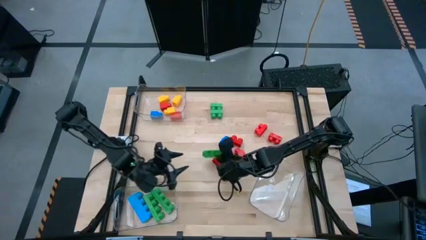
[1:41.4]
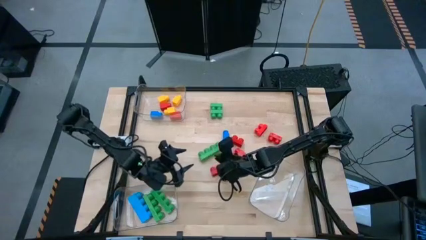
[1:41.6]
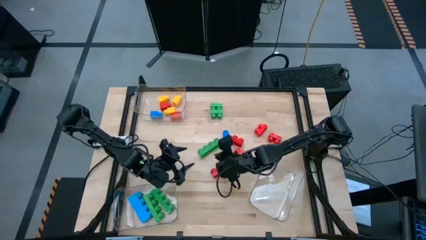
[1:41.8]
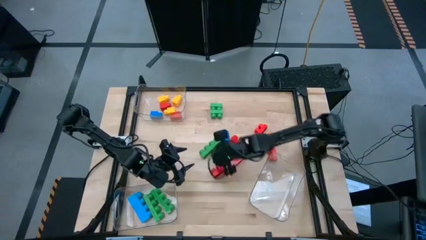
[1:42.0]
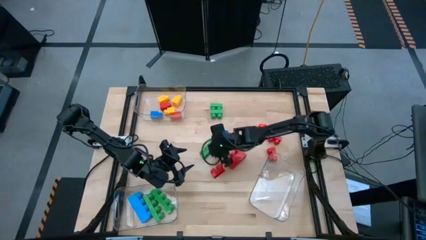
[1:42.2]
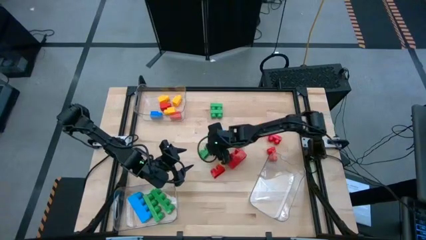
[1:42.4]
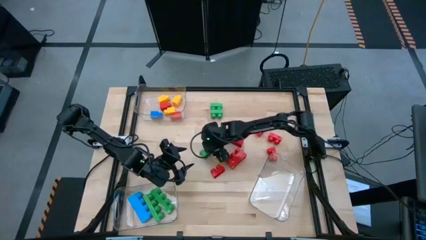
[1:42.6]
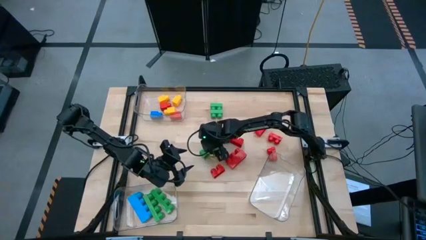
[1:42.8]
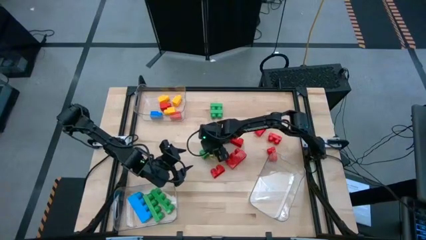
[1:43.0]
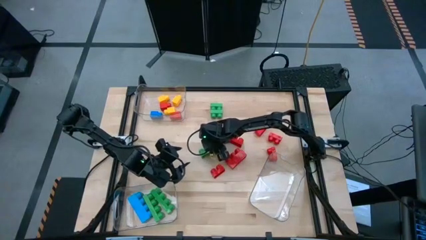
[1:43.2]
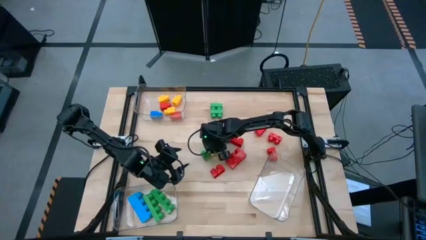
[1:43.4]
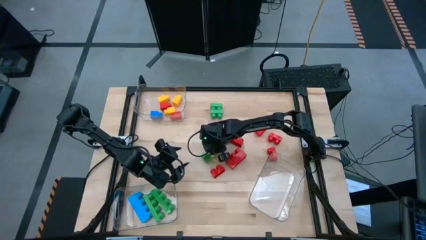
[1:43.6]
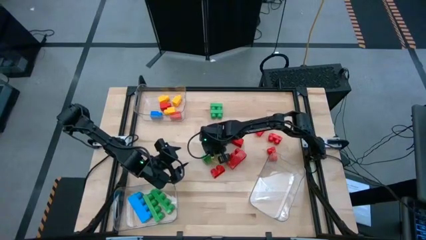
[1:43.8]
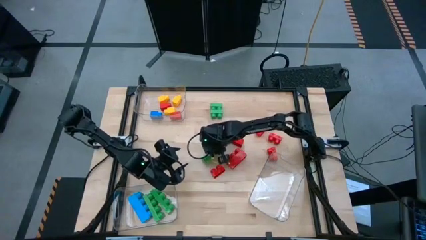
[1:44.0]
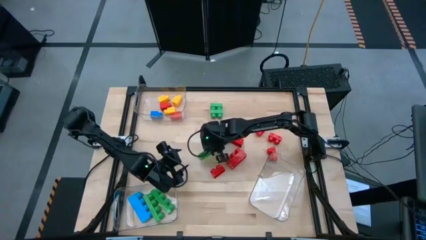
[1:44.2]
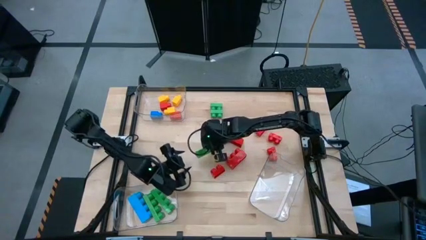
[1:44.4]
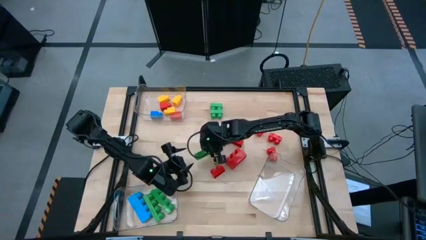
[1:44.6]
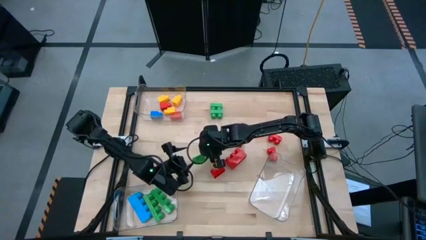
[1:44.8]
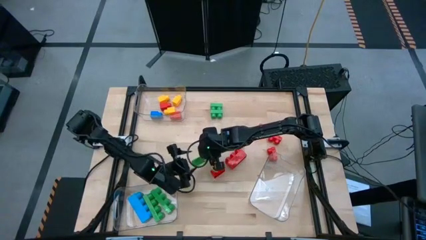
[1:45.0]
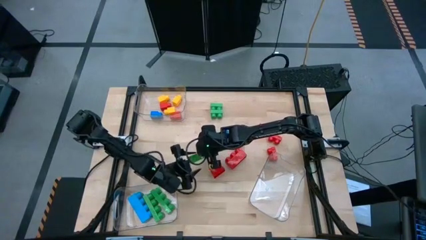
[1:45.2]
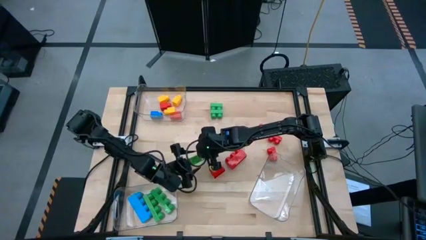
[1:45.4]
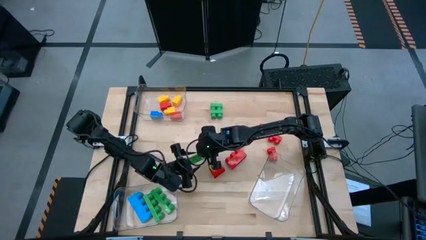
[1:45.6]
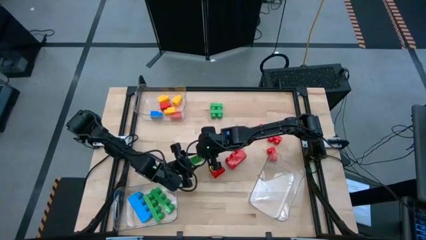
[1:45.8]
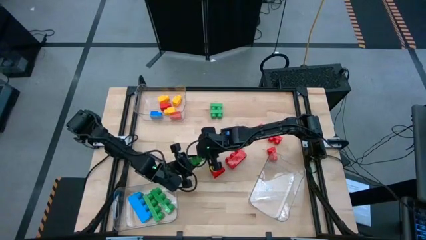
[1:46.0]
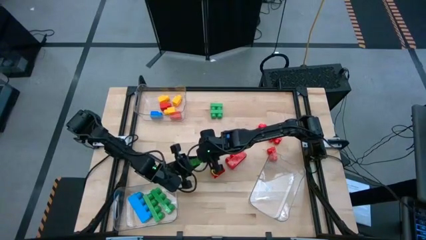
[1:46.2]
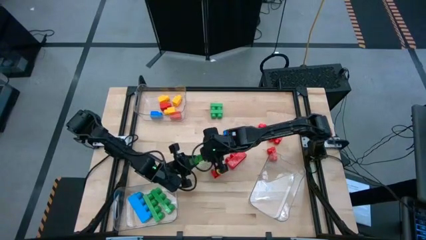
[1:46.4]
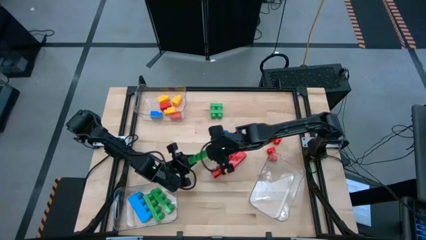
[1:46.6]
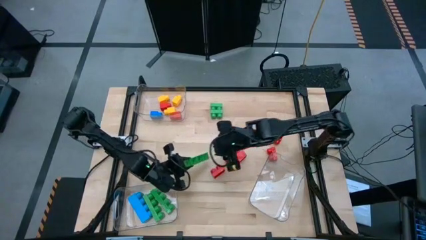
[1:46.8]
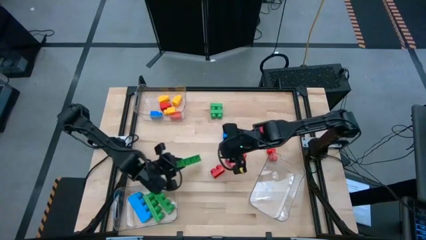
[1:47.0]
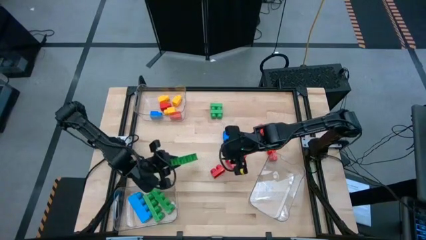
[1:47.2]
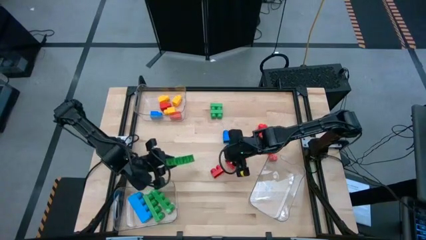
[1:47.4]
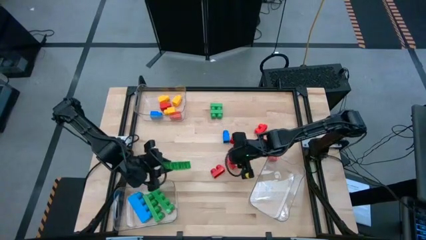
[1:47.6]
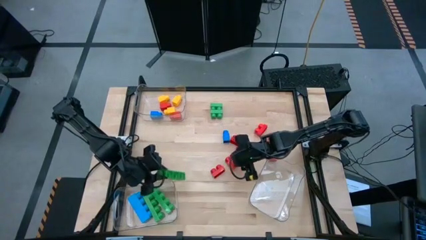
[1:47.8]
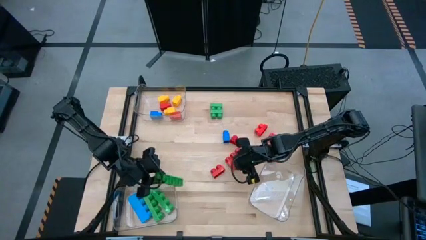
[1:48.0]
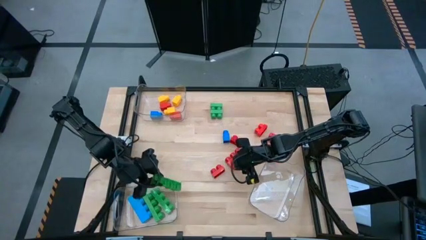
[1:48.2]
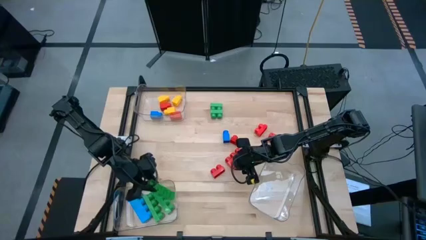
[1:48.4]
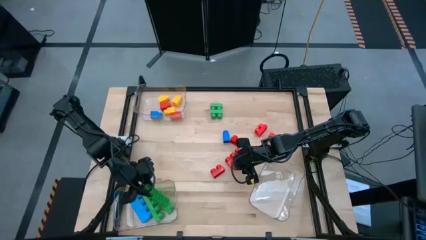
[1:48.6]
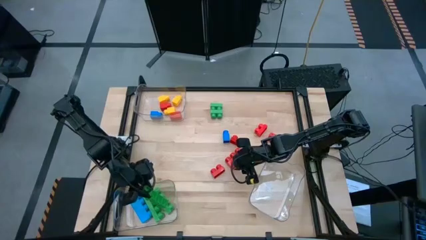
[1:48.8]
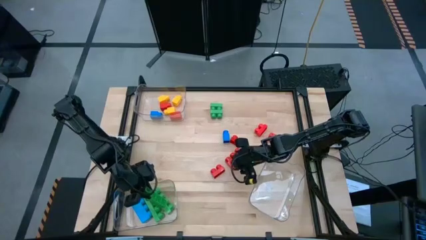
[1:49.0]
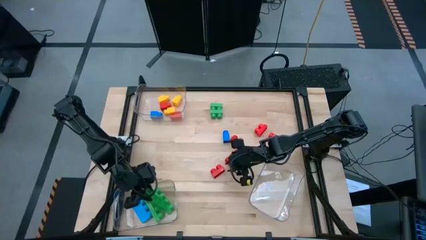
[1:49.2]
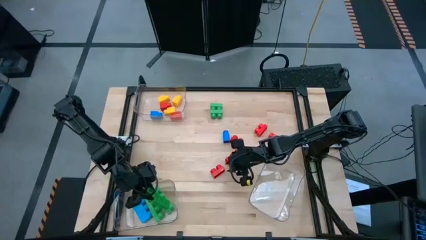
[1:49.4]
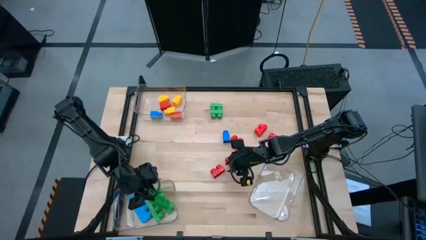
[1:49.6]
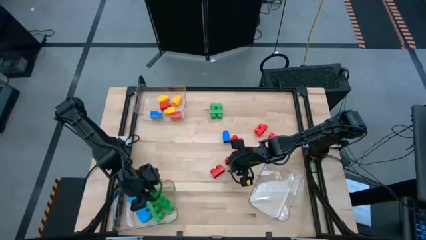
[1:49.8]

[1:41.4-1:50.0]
Task: Sort blocks by size
Put the four-stud green game piece into the bottom left transparent bin

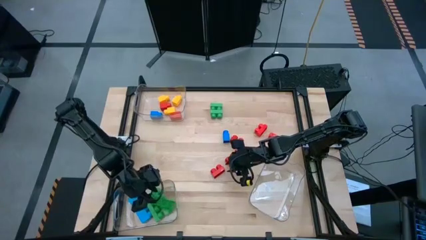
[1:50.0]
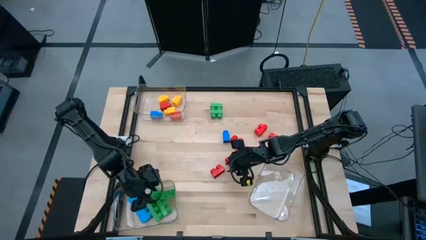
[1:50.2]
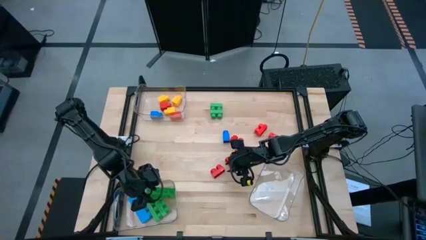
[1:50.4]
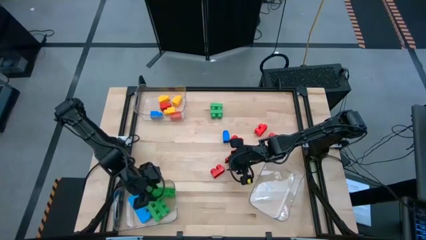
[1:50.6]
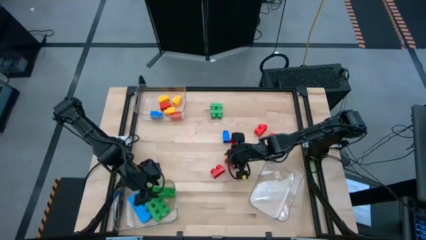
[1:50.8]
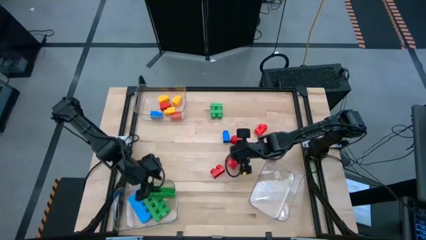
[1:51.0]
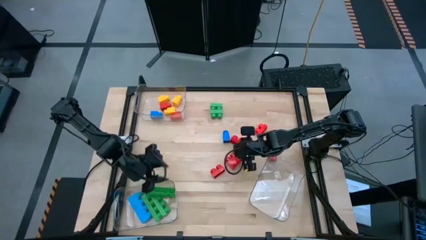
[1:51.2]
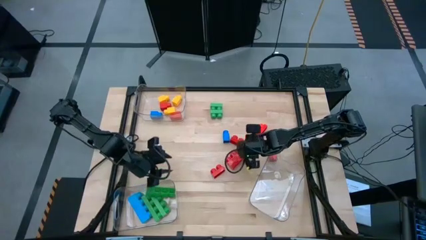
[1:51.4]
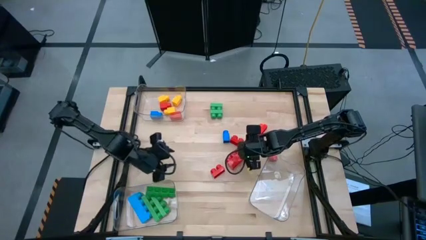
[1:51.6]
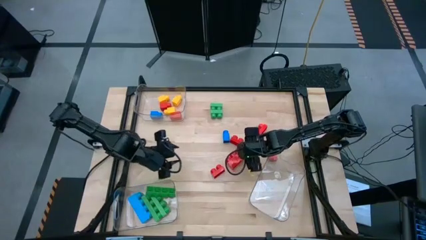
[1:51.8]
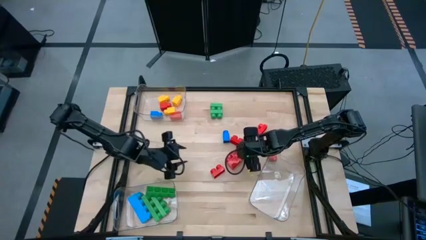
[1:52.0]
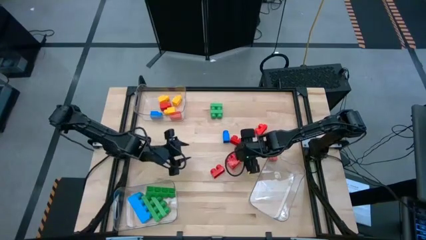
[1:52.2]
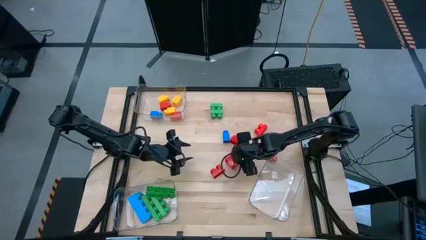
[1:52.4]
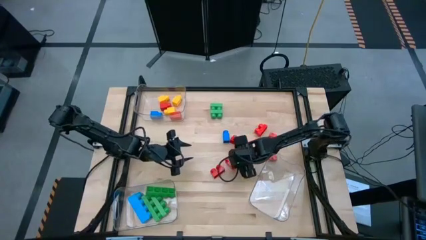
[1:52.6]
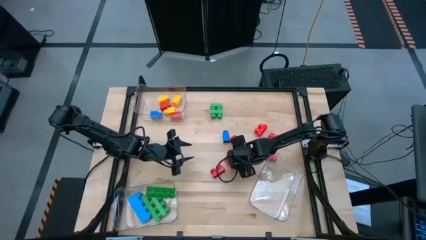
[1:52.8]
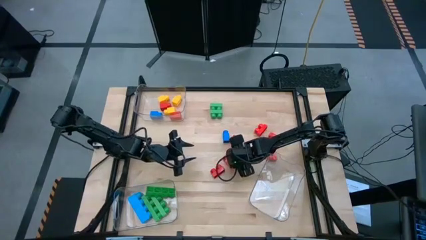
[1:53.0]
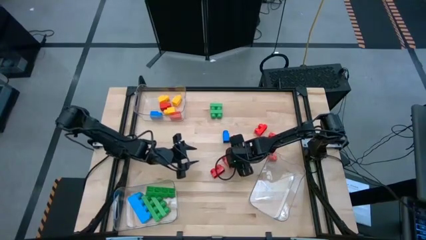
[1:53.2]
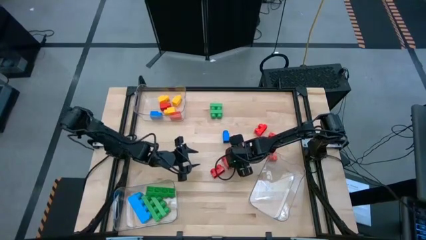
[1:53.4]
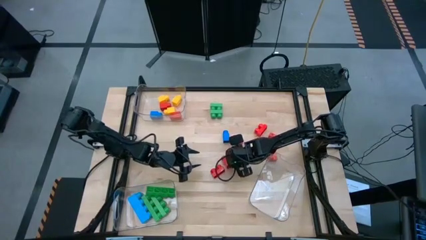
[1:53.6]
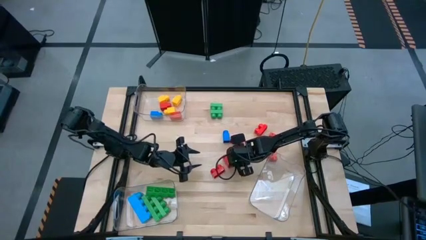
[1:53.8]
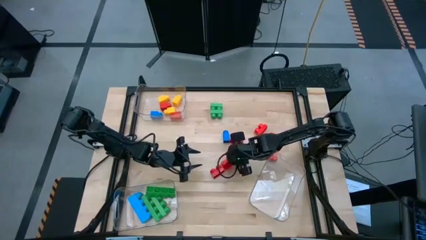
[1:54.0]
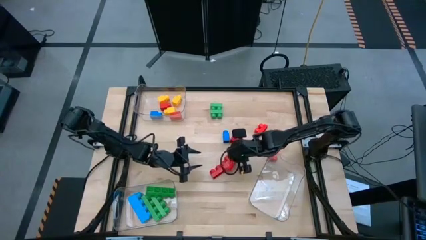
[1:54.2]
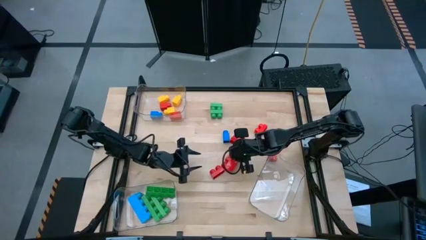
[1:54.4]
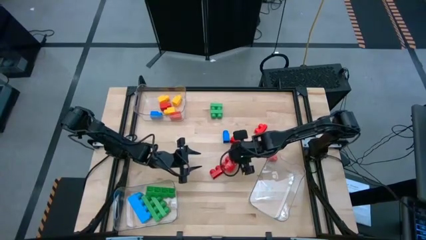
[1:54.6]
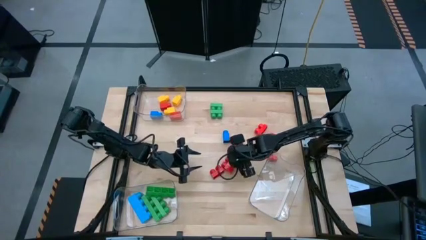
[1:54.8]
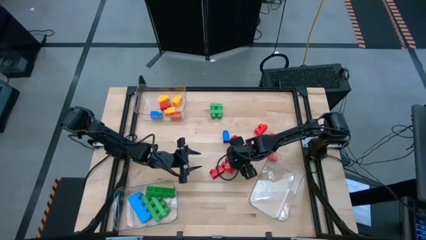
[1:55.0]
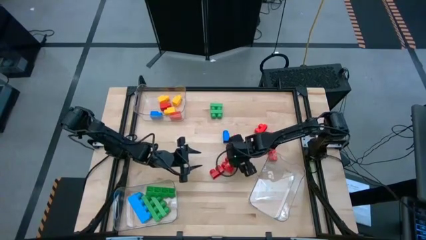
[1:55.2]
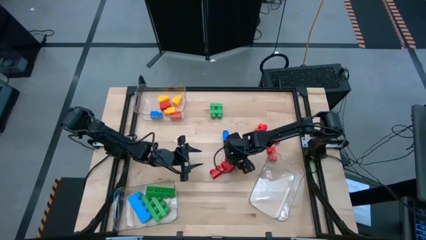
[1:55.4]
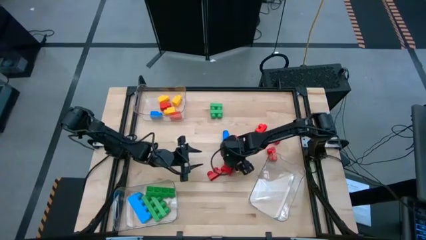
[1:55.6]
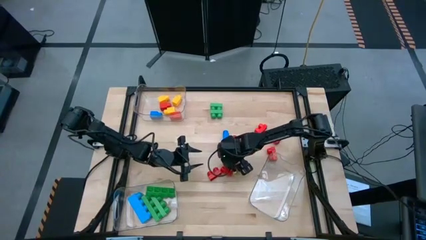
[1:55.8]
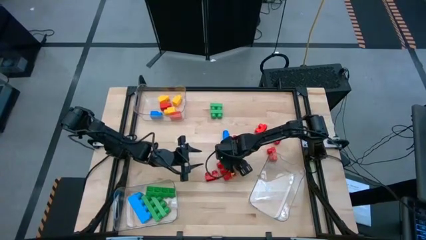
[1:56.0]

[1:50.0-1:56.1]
Put the four-stud red game piece into the bottom left transparent bin

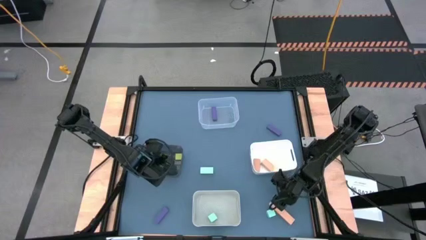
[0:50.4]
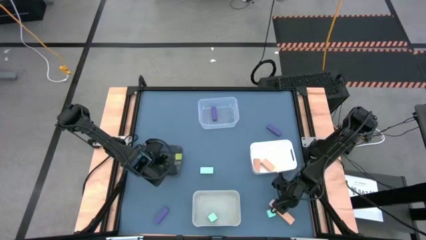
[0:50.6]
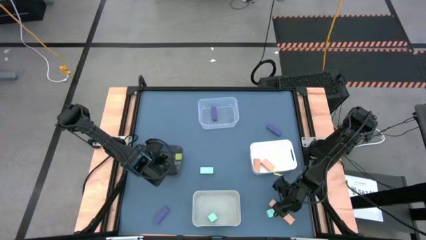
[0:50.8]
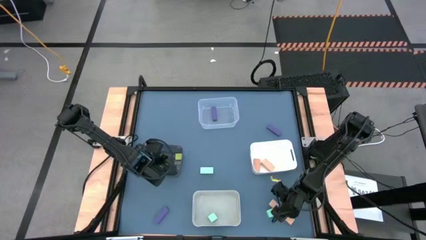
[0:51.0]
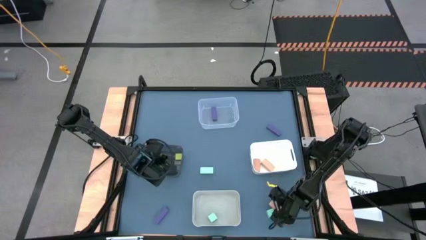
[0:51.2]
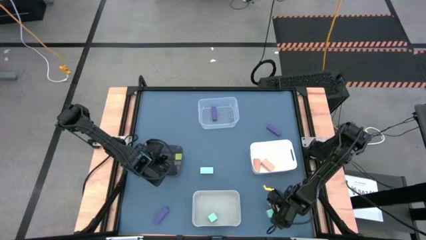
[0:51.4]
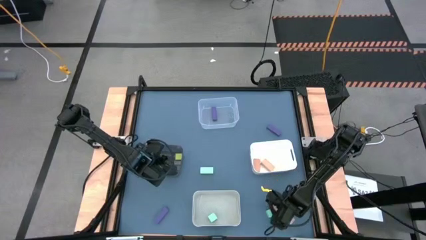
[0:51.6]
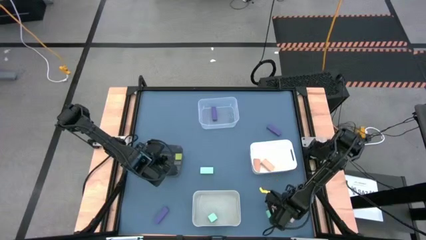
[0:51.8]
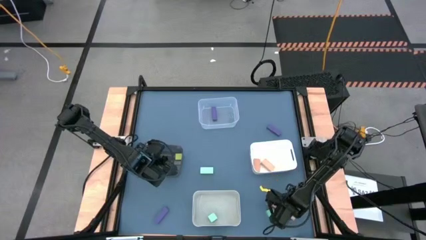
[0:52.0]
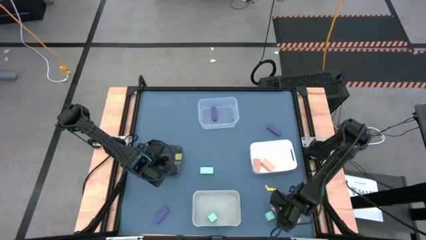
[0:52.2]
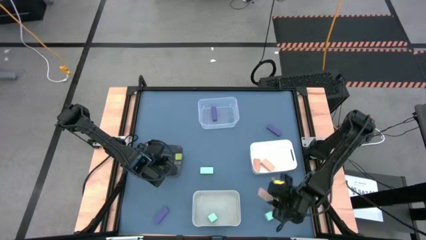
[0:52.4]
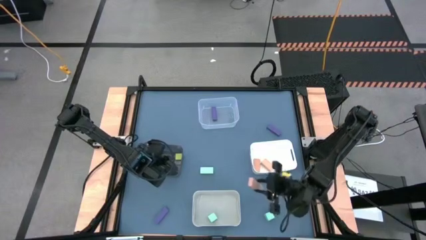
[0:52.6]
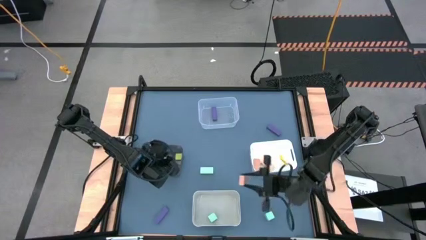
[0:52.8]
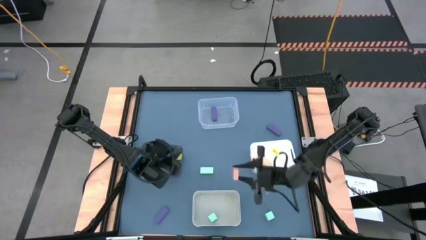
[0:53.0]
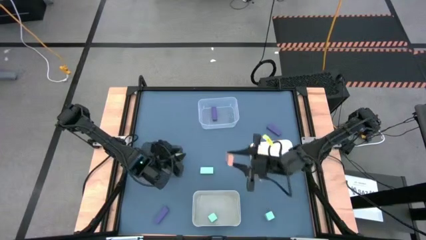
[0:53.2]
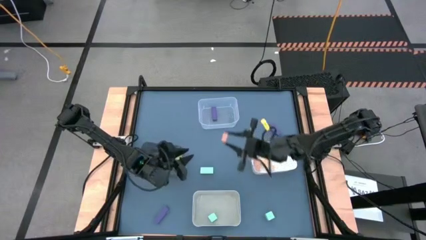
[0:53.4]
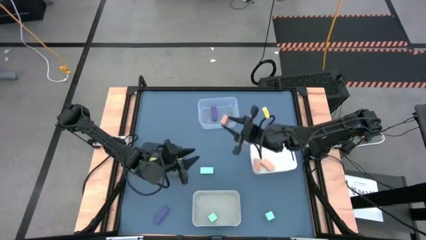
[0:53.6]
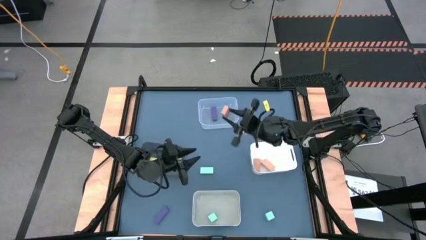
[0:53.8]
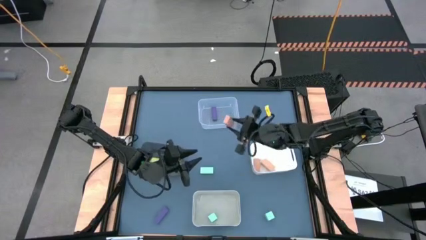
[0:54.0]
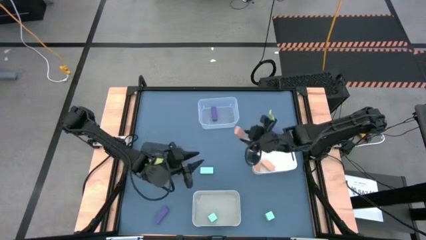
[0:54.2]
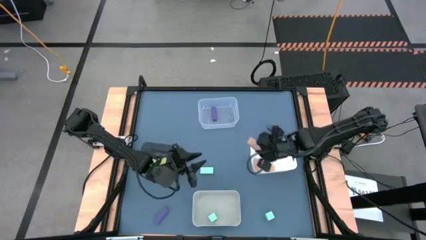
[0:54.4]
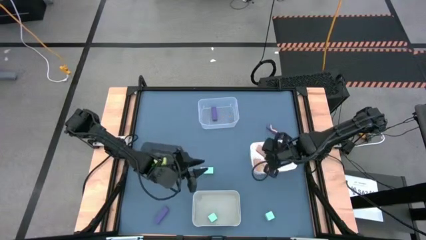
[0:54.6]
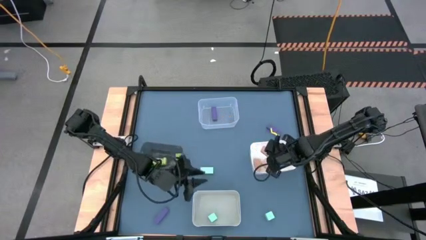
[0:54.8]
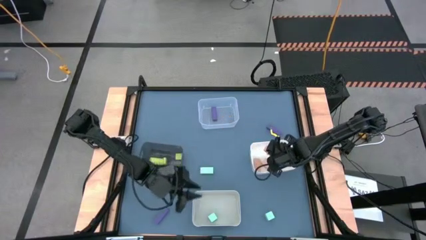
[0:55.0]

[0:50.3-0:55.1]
Task: Sort & place blocks by color
Put the brown block into the white bin
